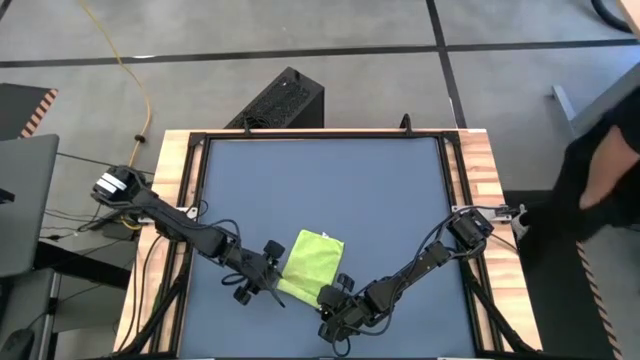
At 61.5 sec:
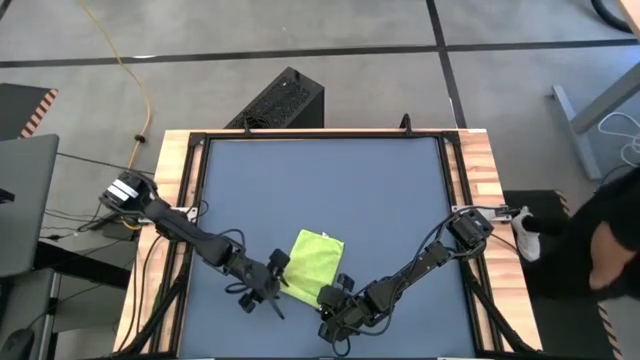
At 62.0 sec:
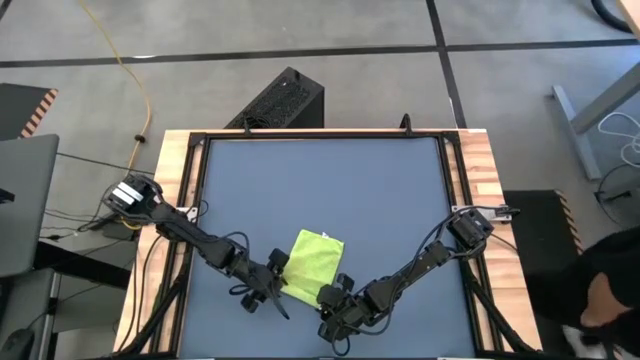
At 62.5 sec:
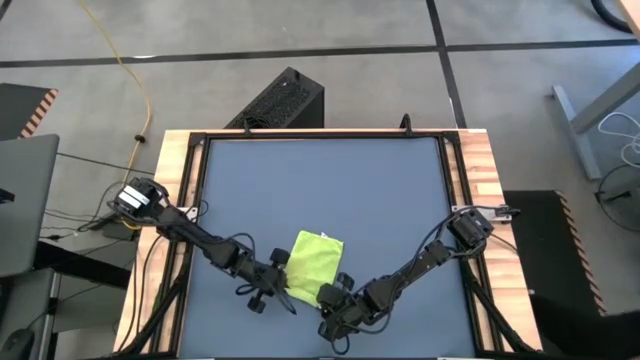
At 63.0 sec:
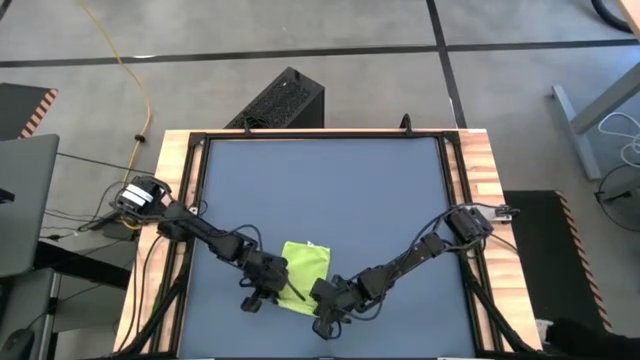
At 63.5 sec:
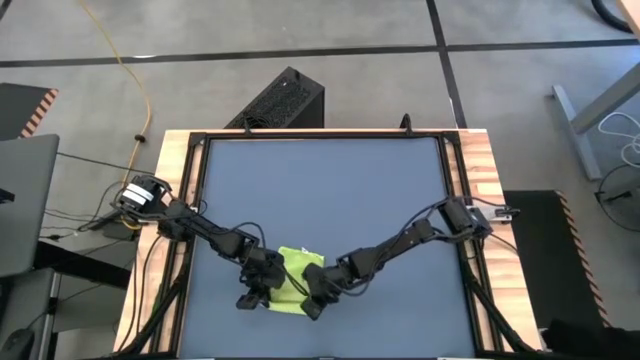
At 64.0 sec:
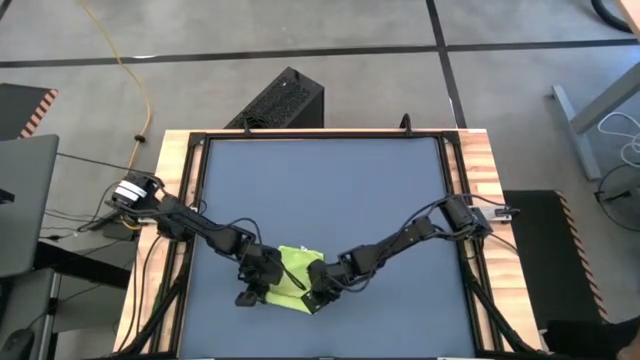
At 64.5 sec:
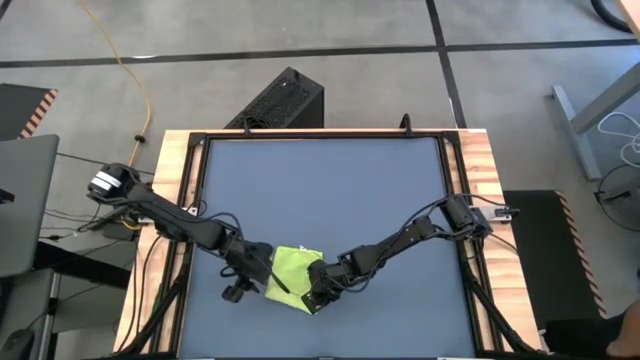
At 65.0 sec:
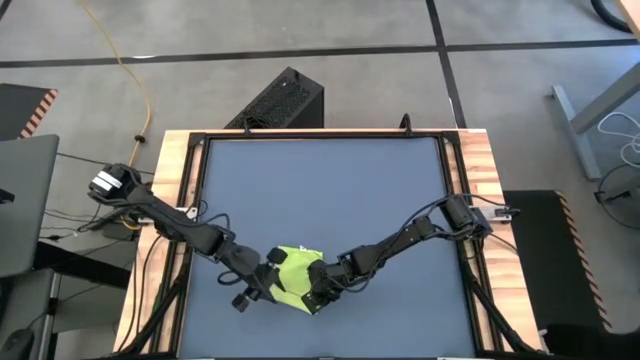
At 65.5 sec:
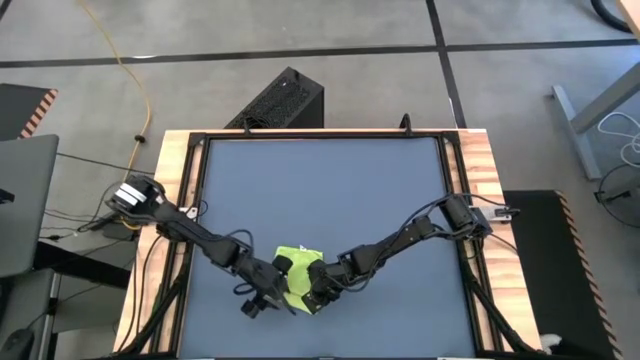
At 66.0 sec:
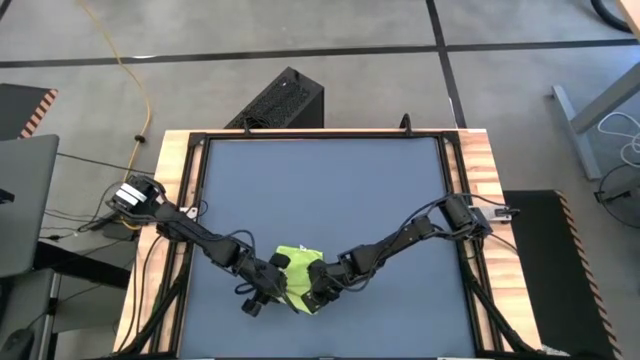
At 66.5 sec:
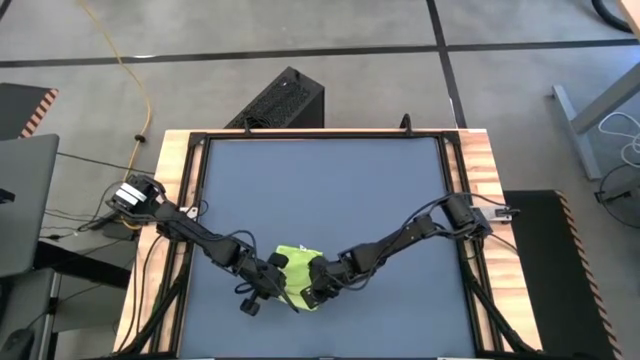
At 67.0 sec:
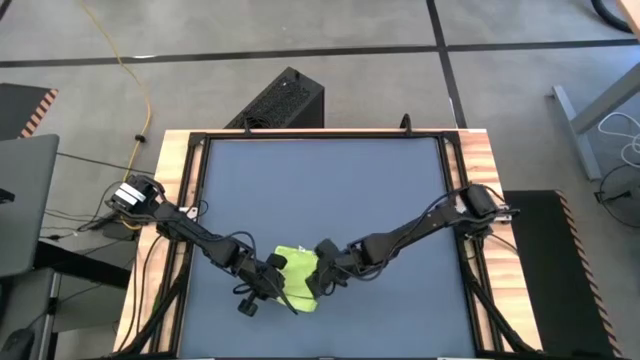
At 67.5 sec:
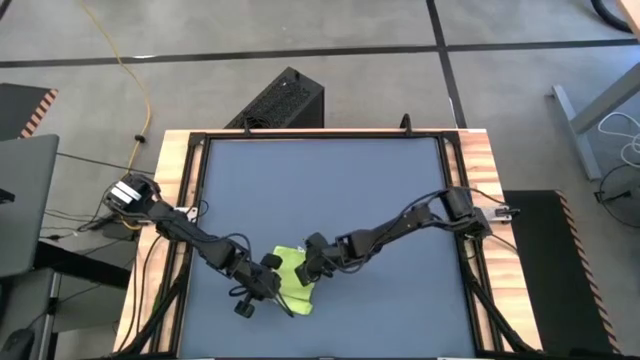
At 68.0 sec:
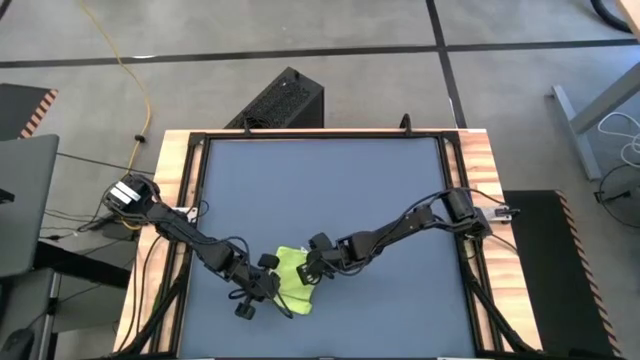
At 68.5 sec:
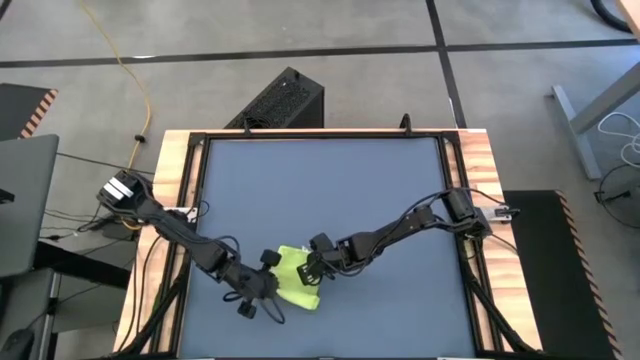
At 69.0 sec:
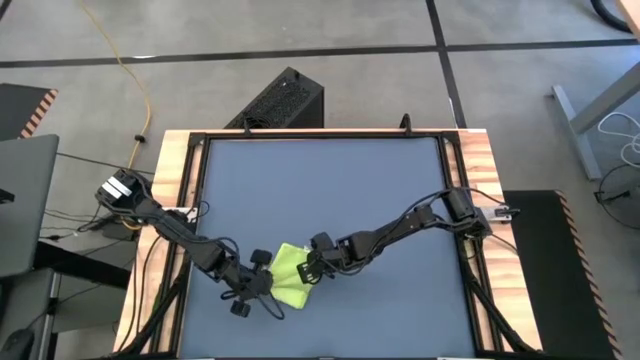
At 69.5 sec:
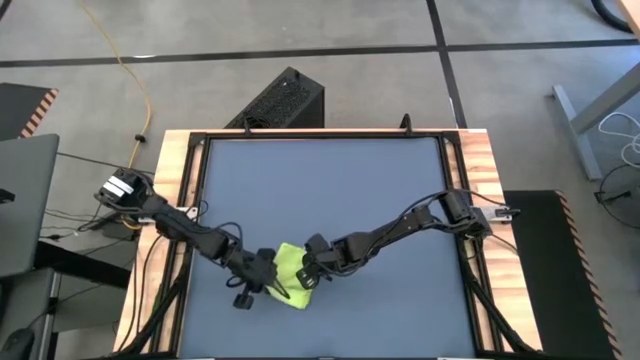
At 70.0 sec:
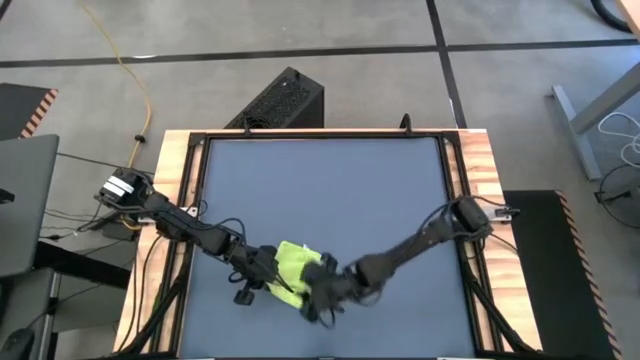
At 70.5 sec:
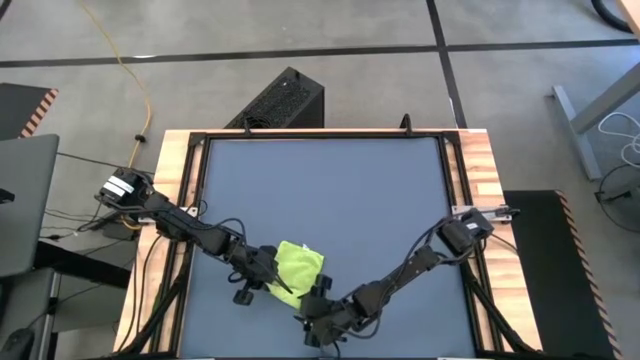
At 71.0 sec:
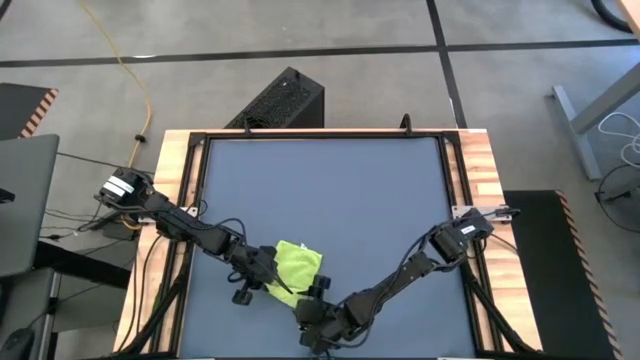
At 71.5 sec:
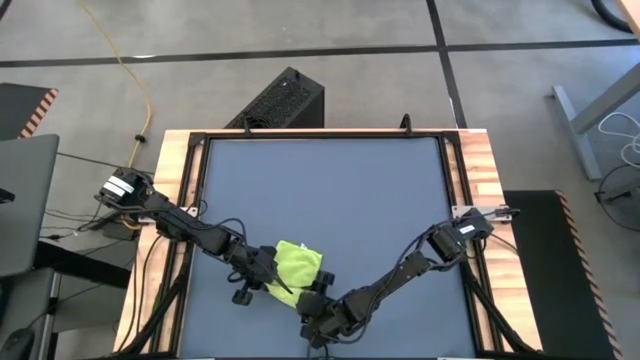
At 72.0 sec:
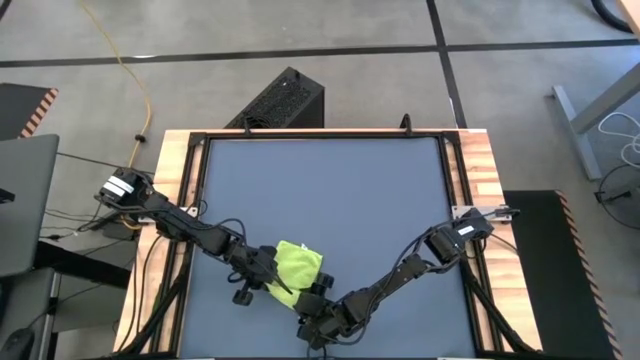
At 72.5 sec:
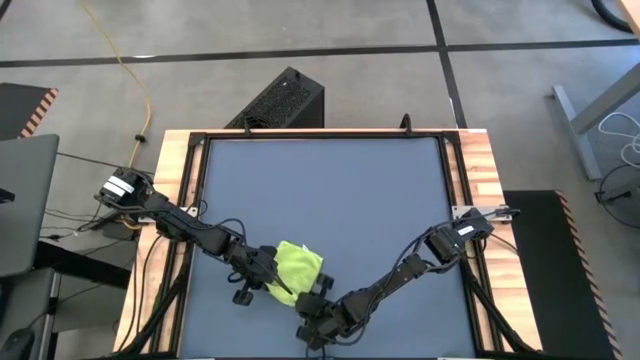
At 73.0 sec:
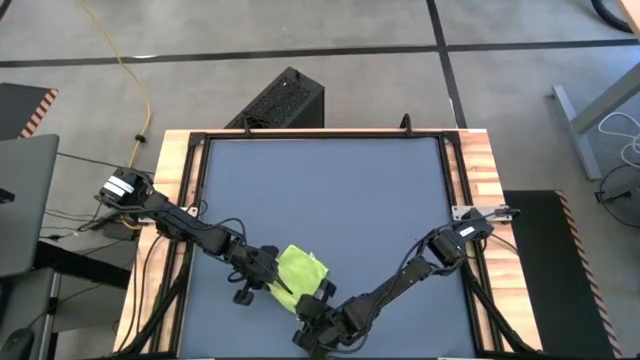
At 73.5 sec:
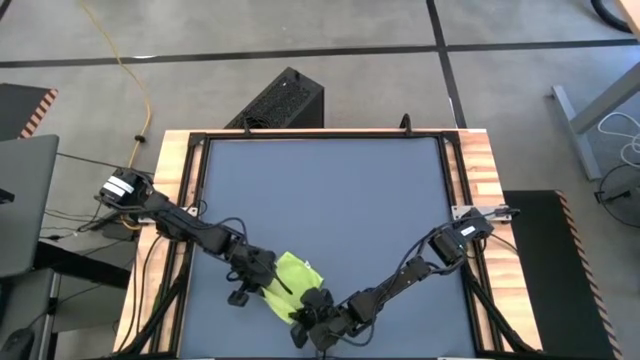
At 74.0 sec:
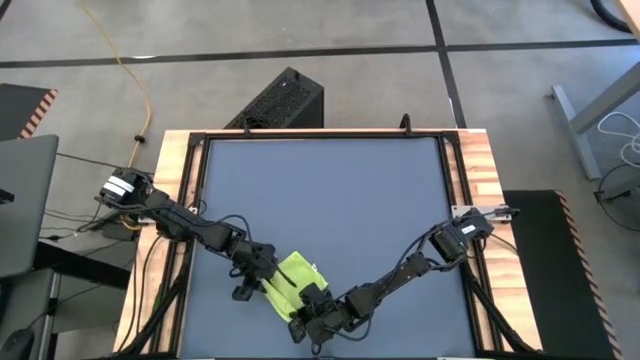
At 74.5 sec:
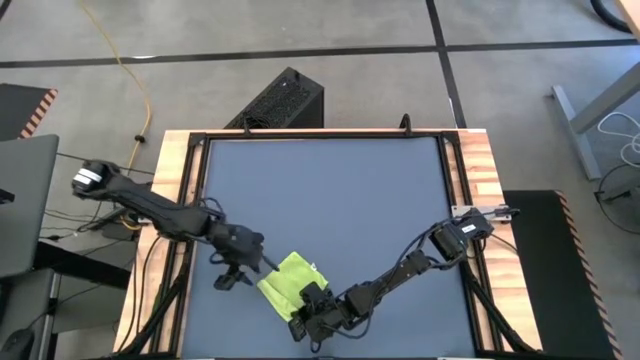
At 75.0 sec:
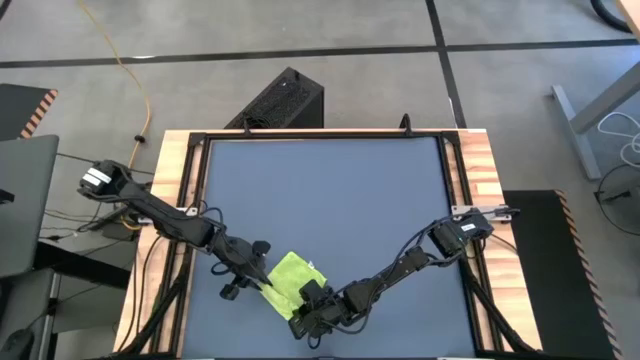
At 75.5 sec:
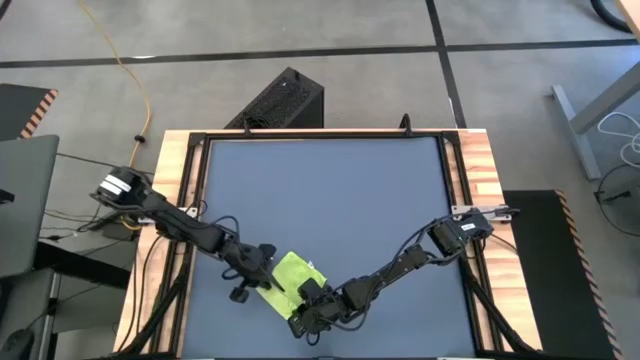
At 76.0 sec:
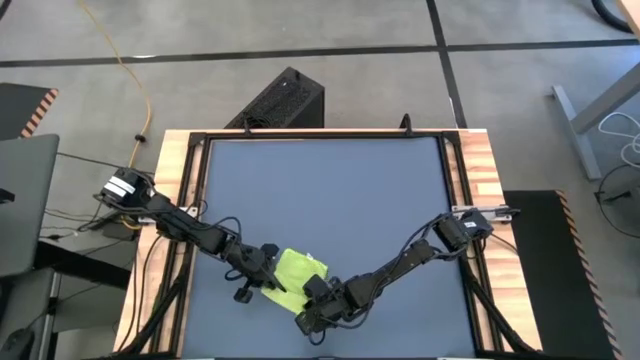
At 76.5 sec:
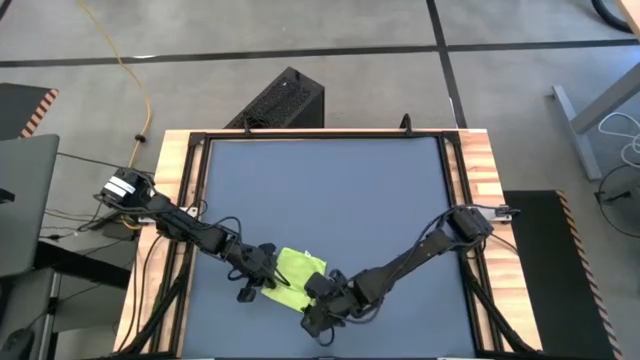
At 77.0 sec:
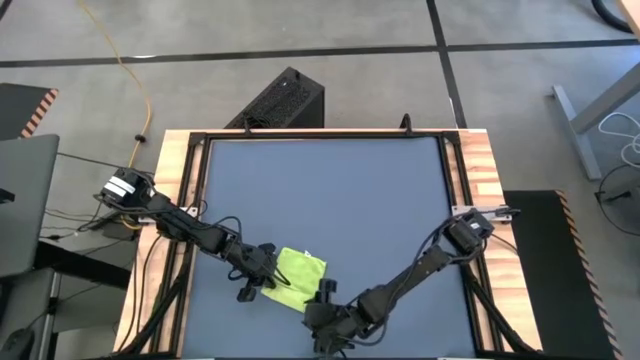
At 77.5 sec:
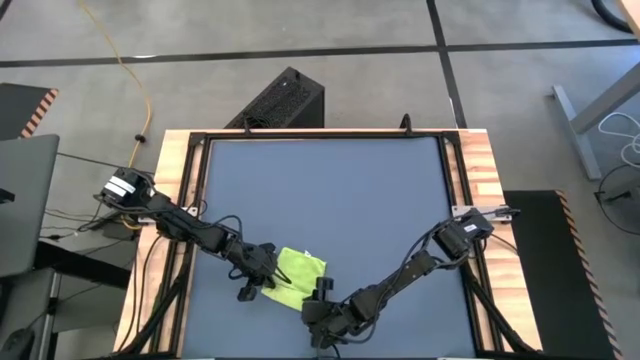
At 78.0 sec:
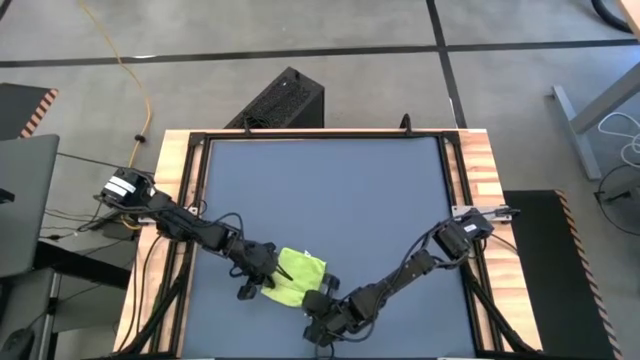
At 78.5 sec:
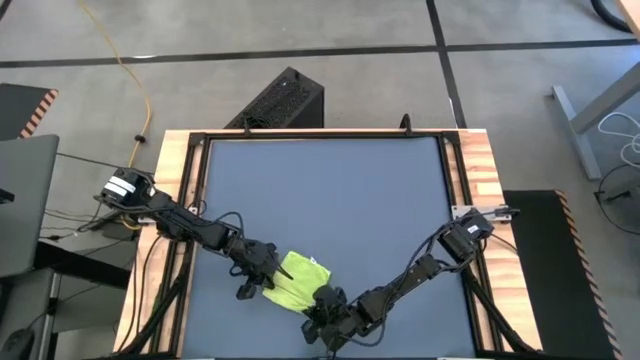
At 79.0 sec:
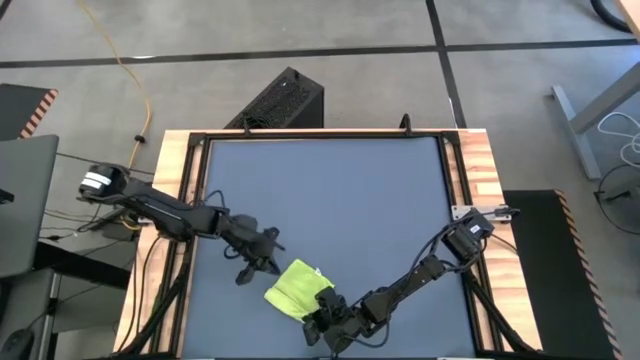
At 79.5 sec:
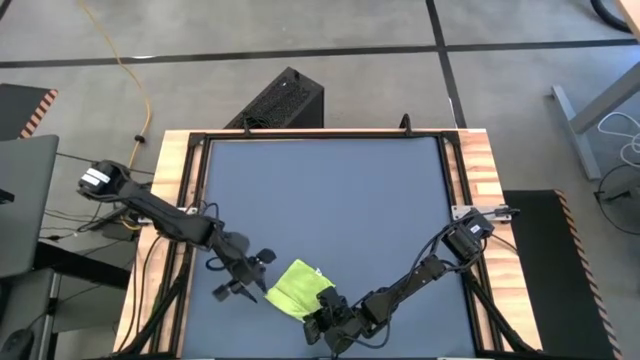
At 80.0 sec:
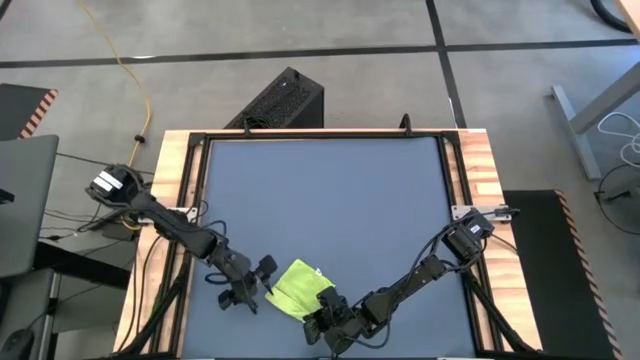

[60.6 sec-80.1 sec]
Task: Roll towel
Roll the green towel

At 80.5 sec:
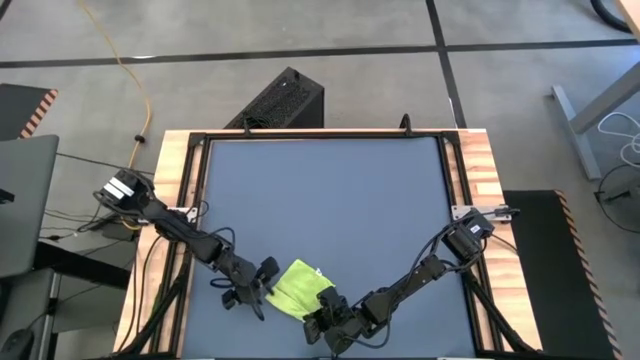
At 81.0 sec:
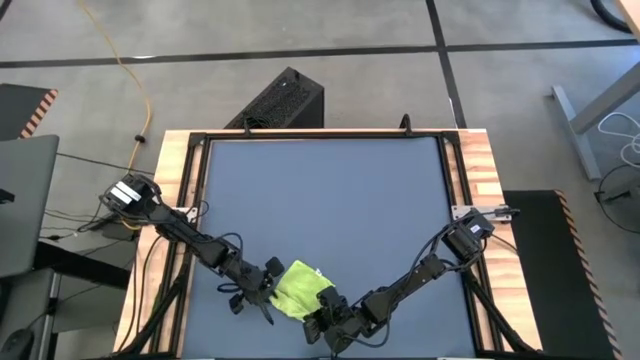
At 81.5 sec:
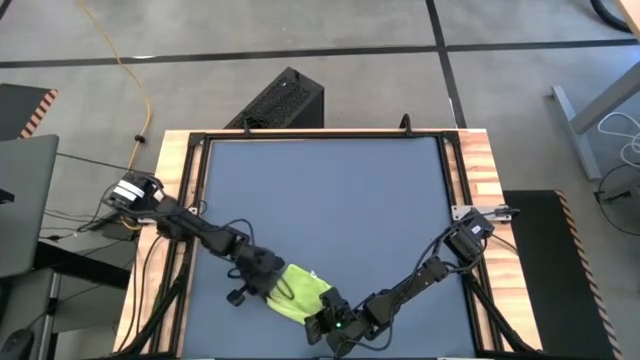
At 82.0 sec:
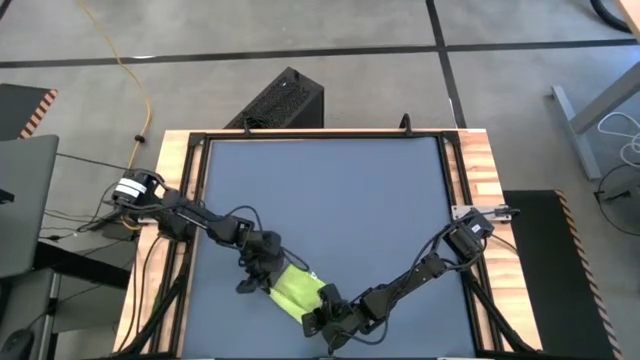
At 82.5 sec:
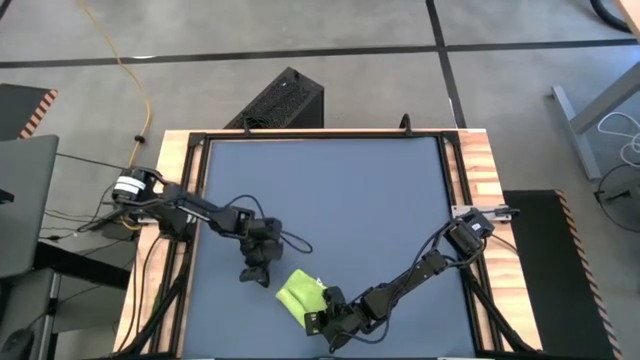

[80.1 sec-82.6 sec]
Roll the green towel
